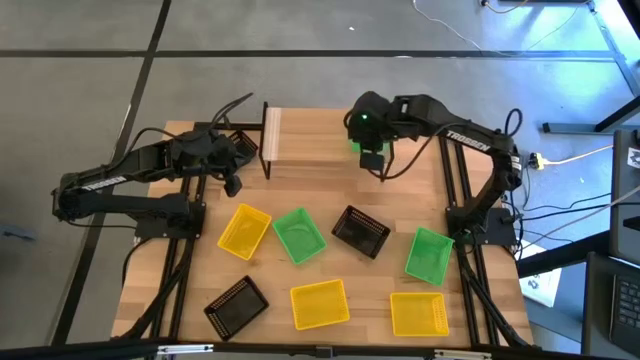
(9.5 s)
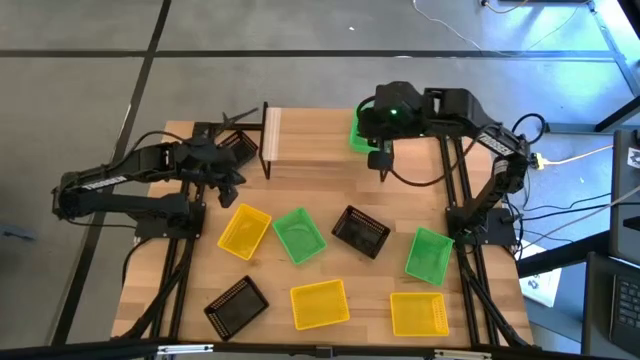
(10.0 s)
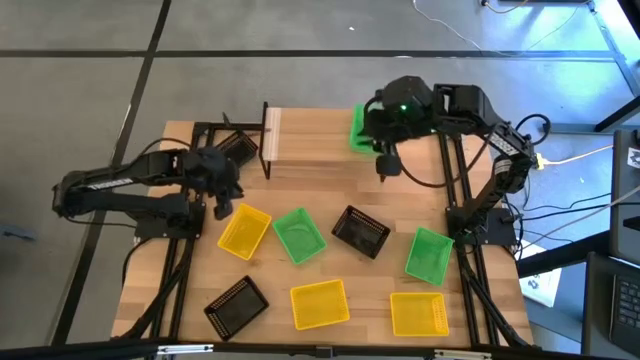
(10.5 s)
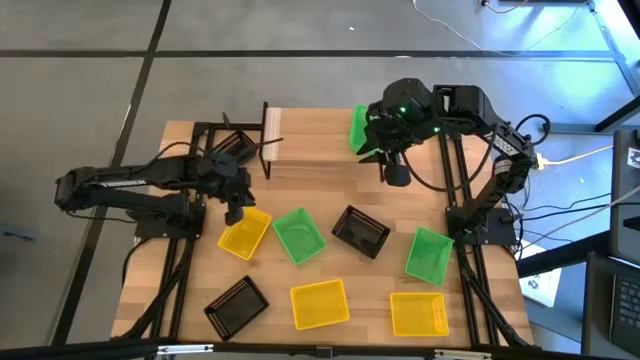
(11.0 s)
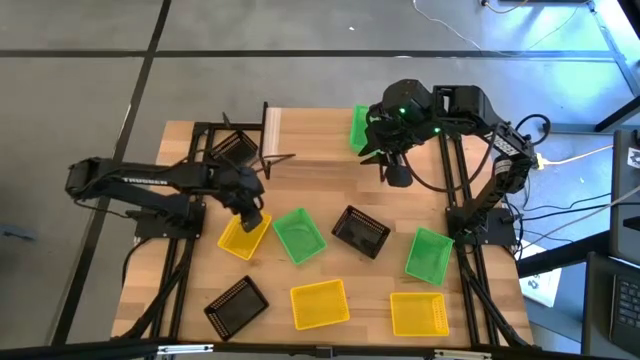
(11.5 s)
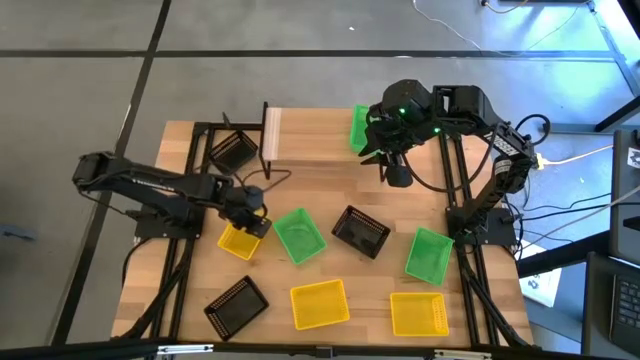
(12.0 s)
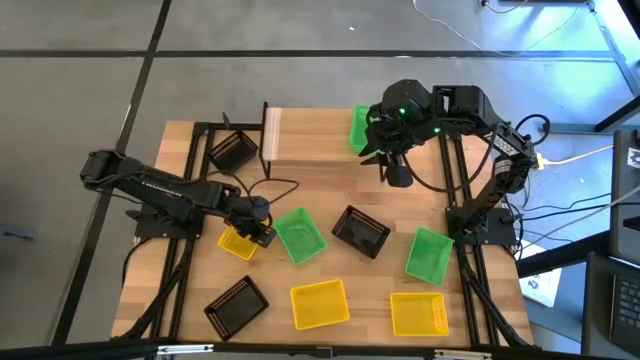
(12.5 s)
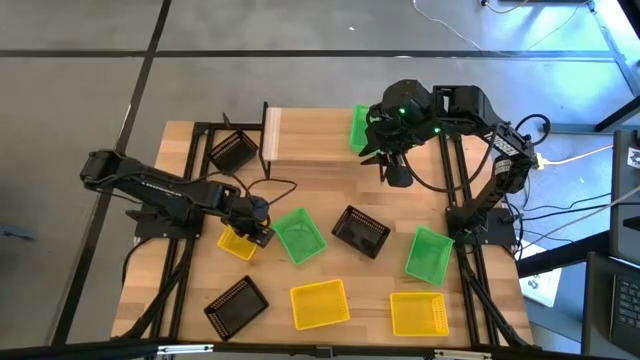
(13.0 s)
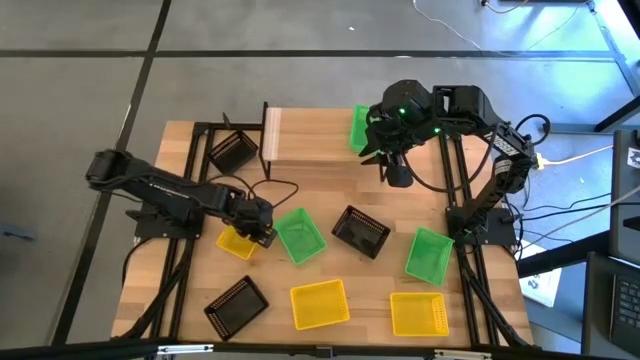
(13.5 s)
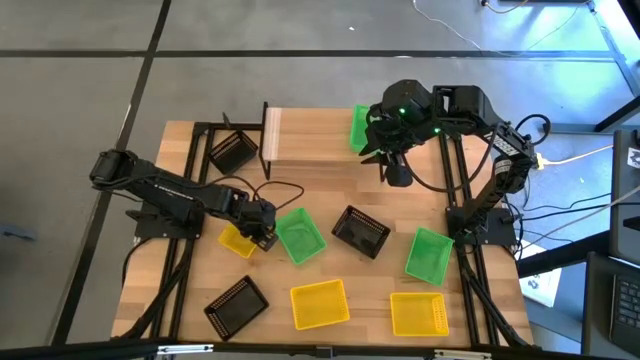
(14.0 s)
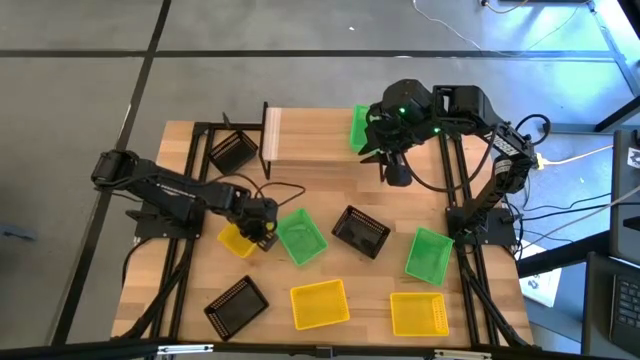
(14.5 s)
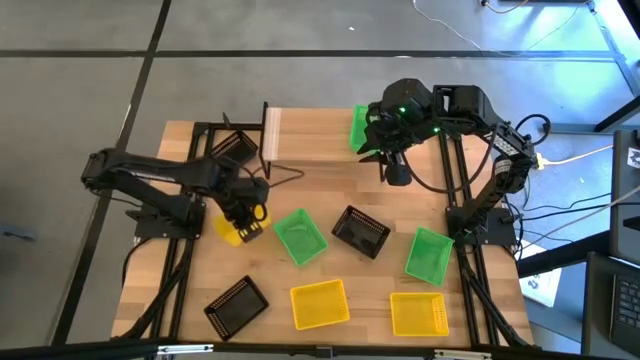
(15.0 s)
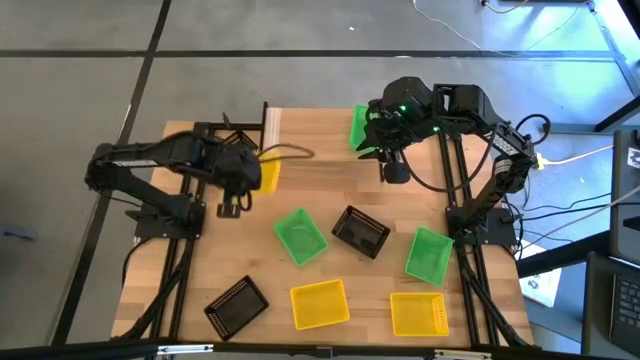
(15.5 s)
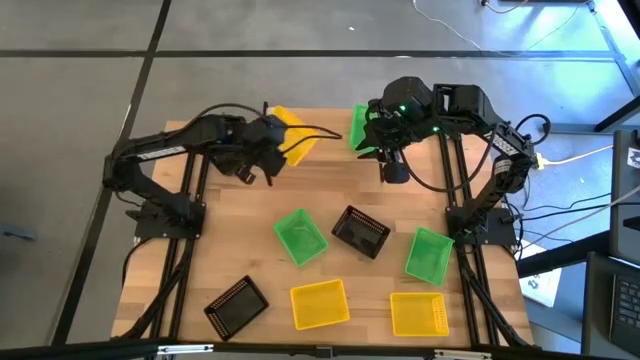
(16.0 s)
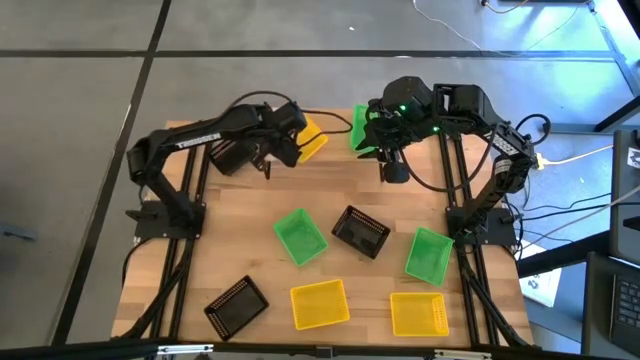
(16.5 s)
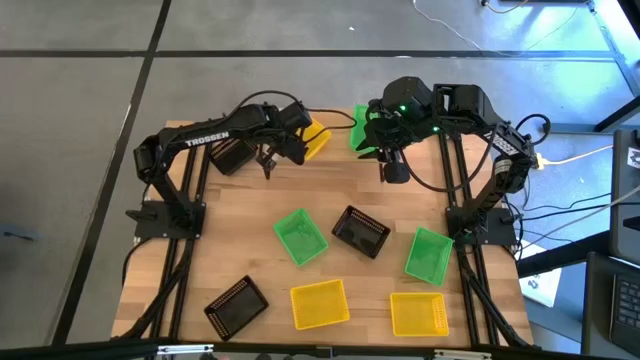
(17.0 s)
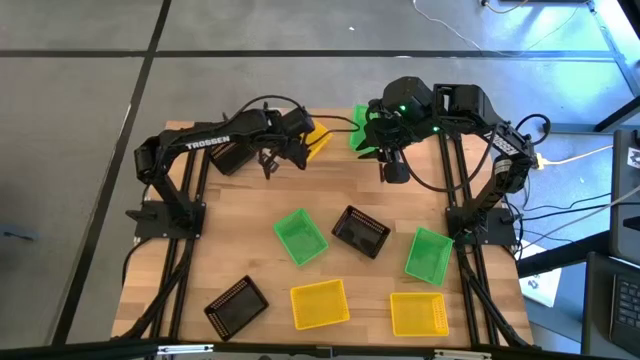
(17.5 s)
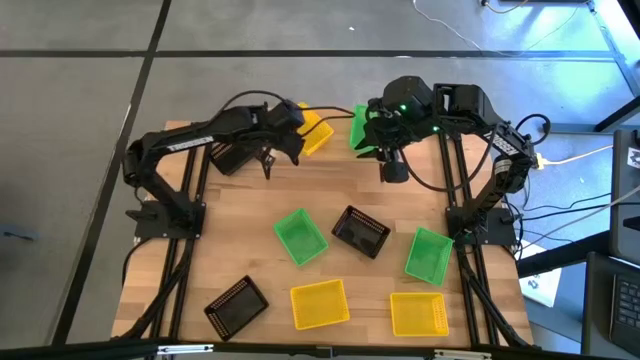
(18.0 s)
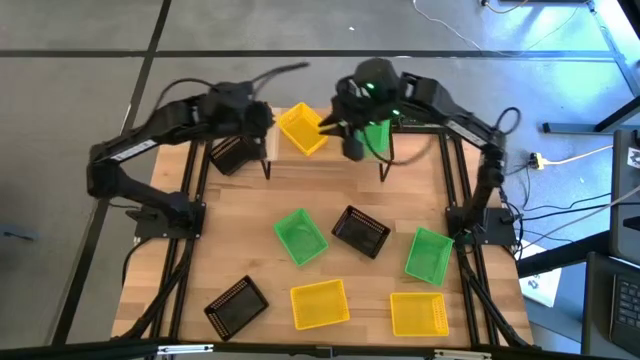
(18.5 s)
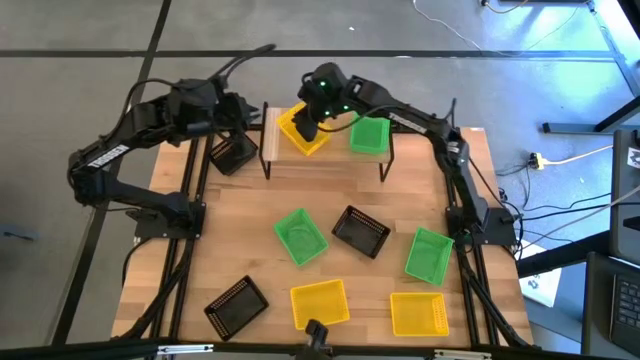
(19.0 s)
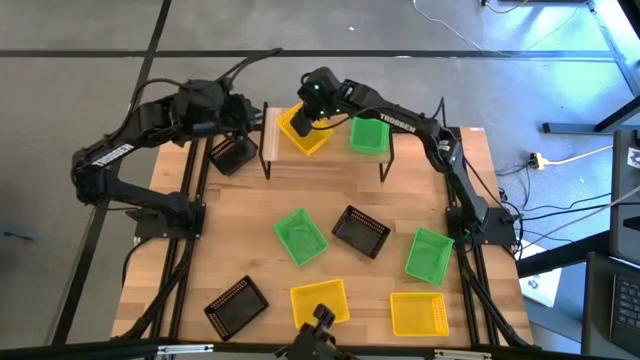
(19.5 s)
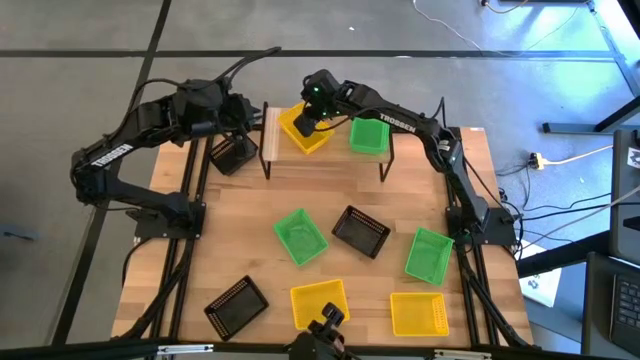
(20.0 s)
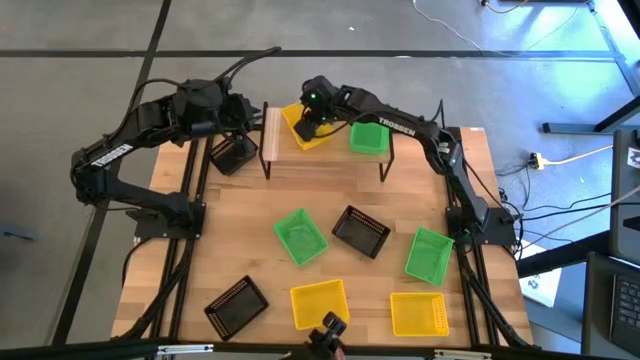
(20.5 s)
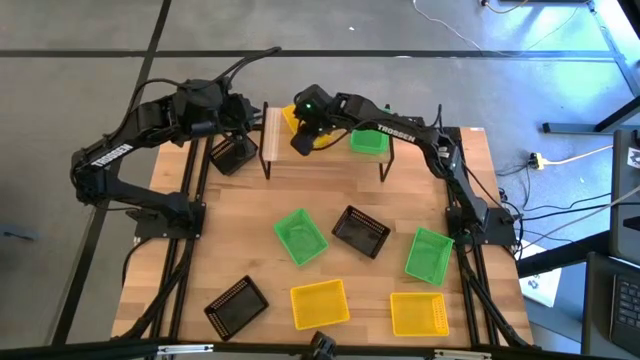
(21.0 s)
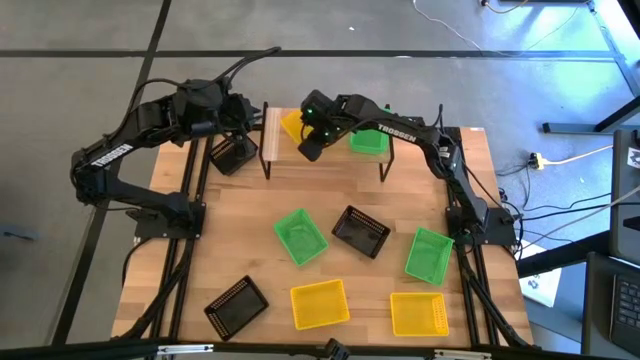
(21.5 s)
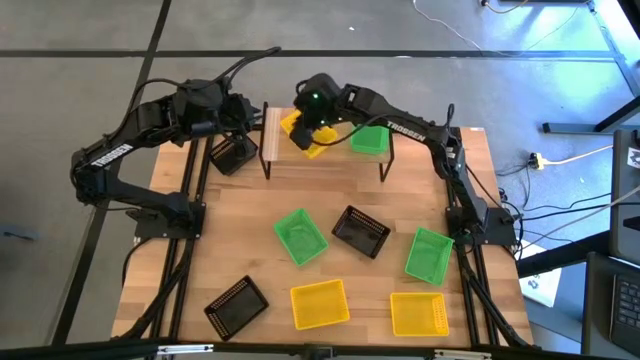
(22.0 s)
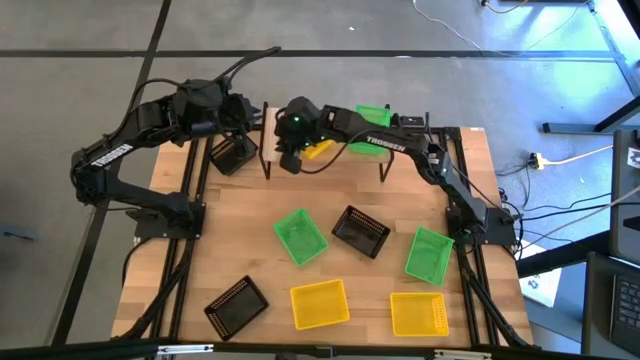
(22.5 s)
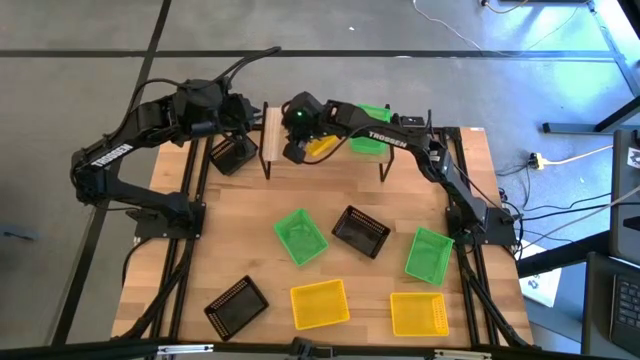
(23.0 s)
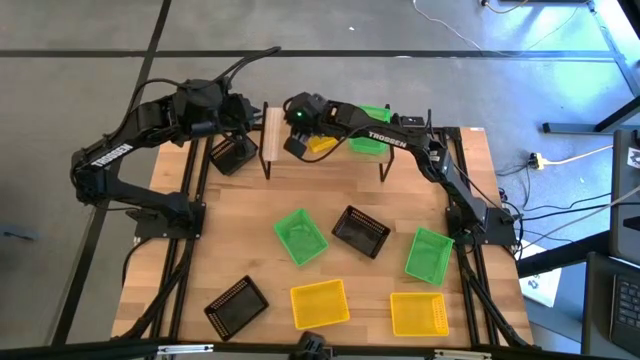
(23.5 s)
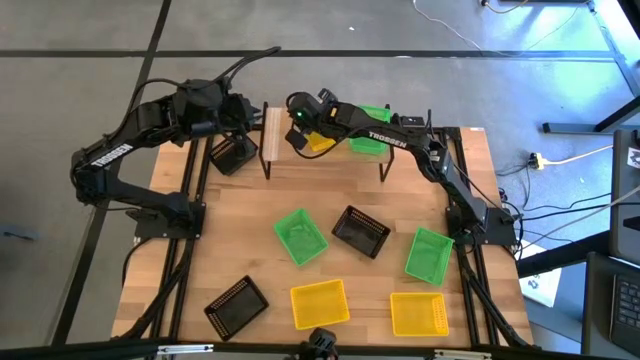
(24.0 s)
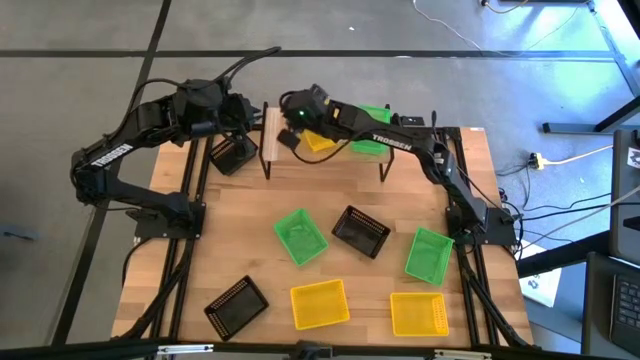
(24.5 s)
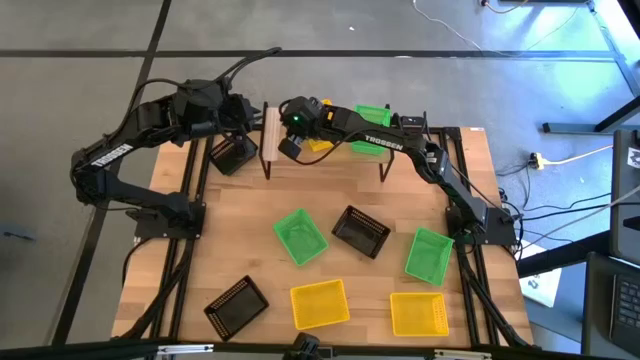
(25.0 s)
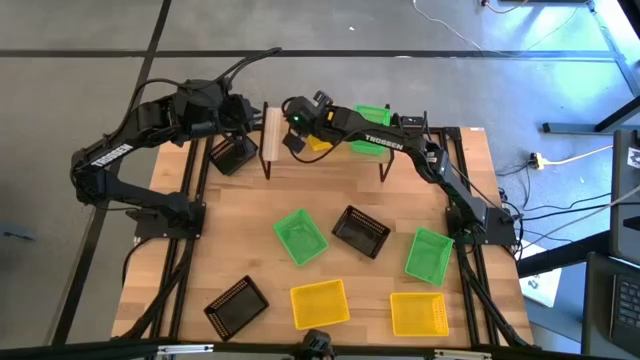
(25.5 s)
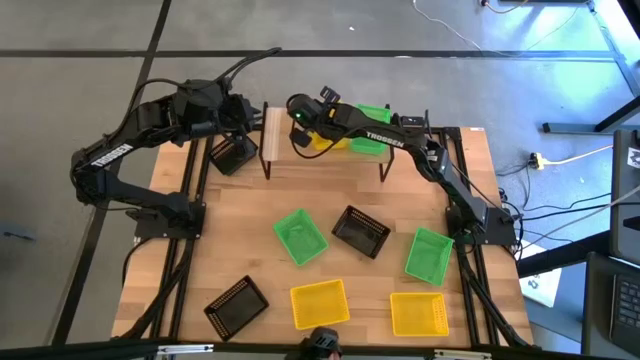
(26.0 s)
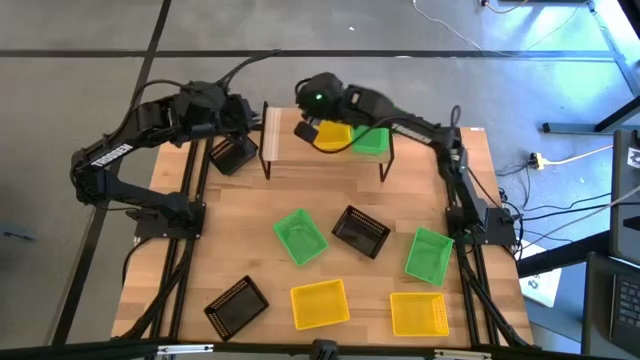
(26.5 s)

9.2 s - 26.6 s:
Task: Stack baskets on shelf by color
Put the top left yellow bin on the shelf

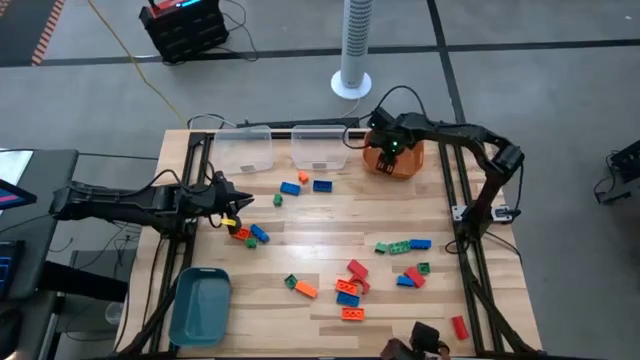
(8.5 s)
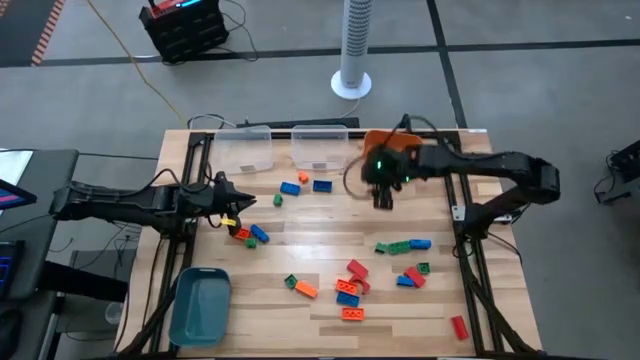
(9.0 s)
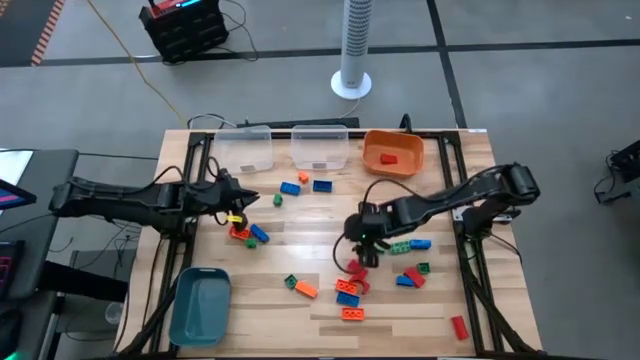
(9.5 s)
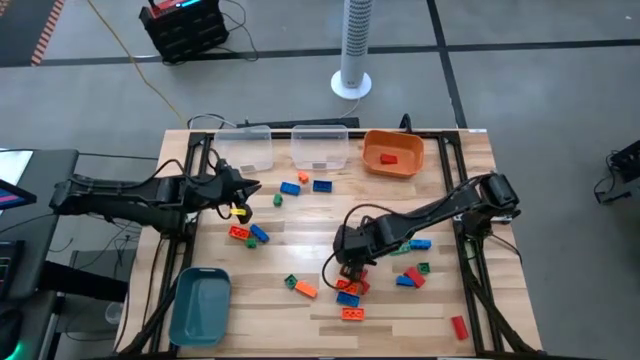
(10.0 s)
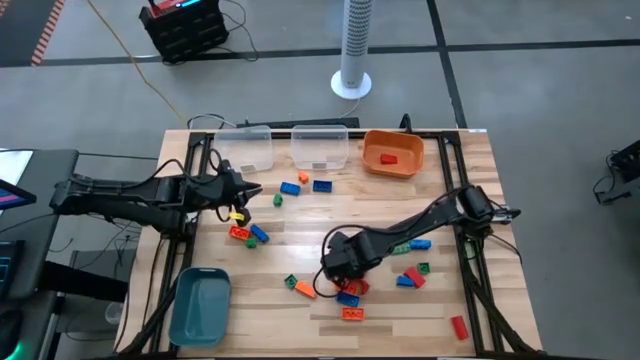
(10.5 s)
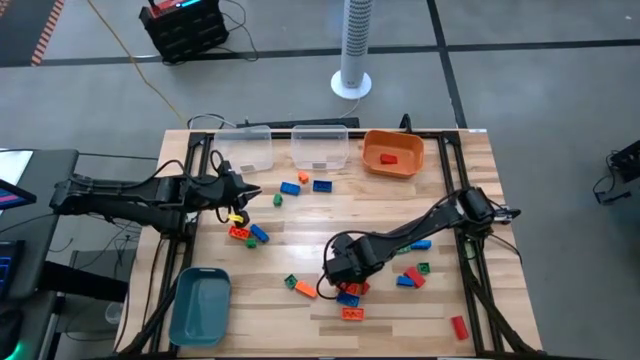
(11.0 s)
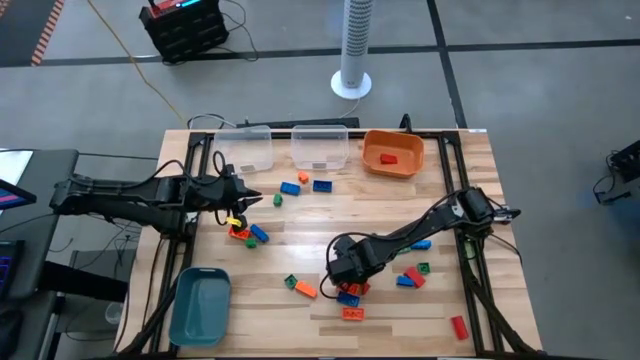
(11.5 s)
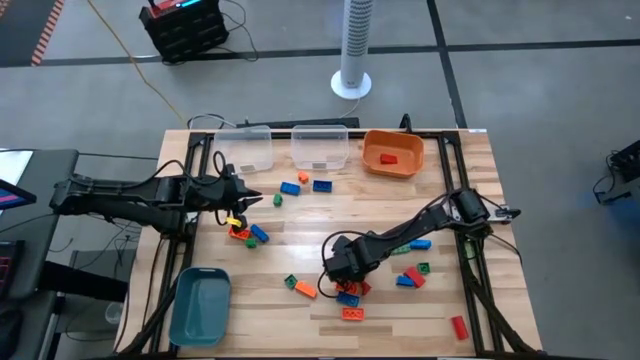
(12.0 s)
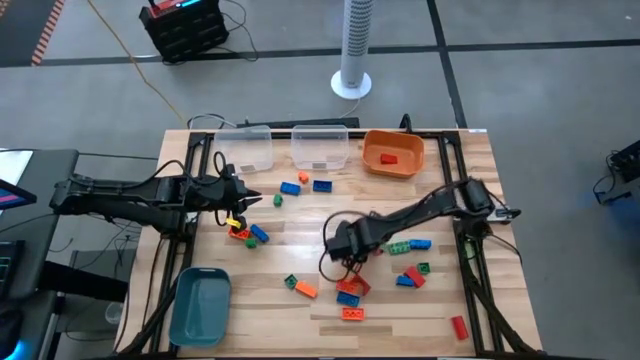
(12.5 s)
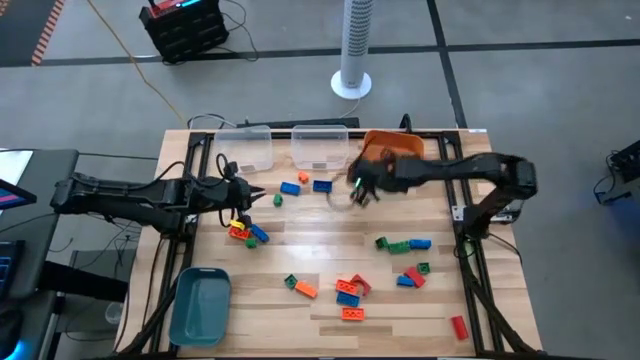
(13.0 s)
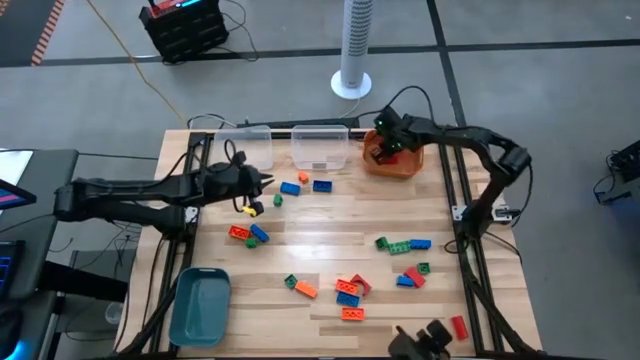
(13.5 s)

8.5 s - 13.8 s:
Task: Sort blocks
Put the red block into the orange bin
